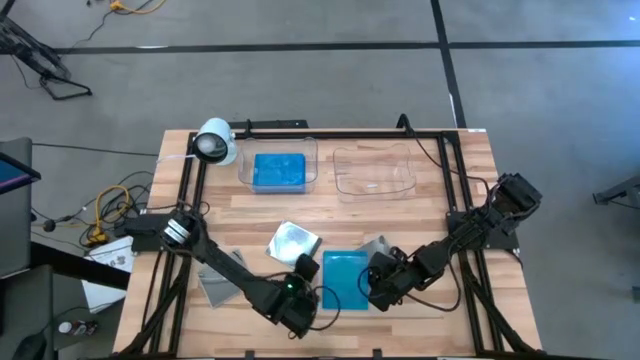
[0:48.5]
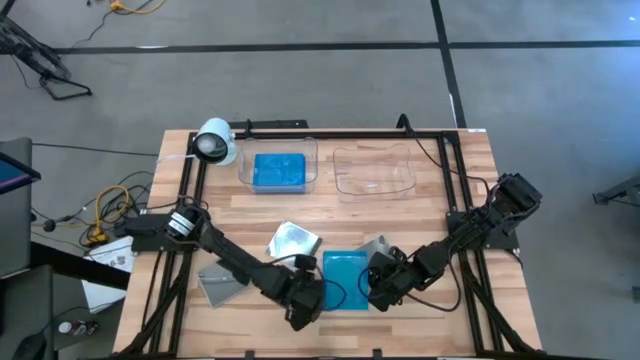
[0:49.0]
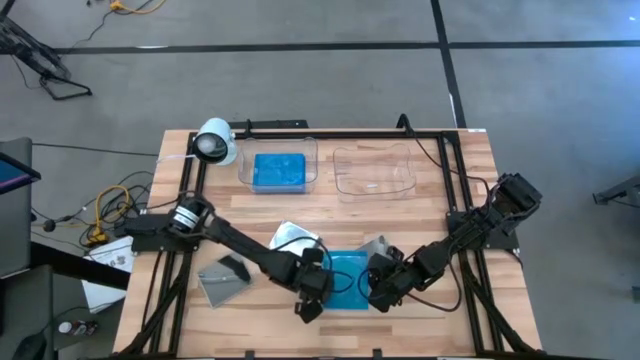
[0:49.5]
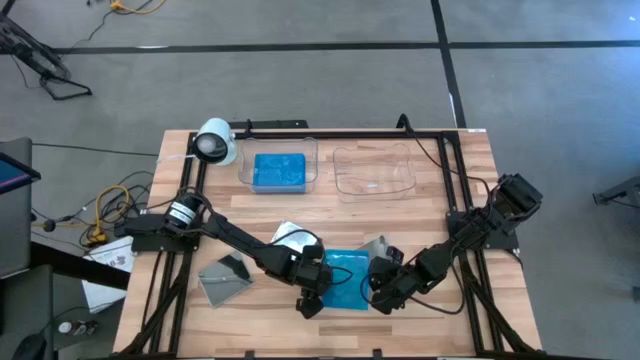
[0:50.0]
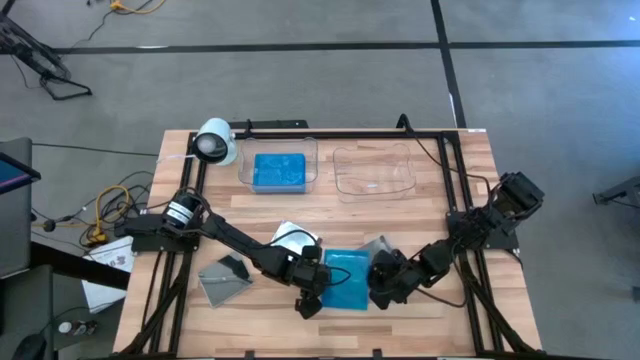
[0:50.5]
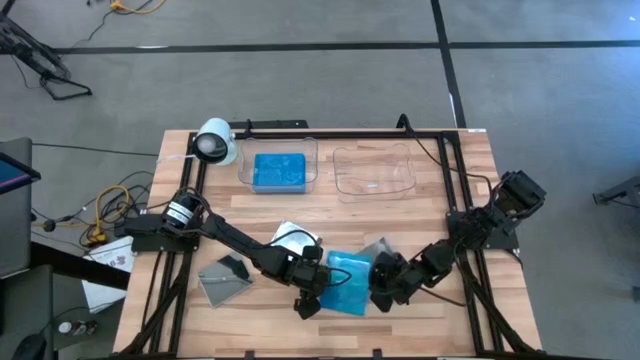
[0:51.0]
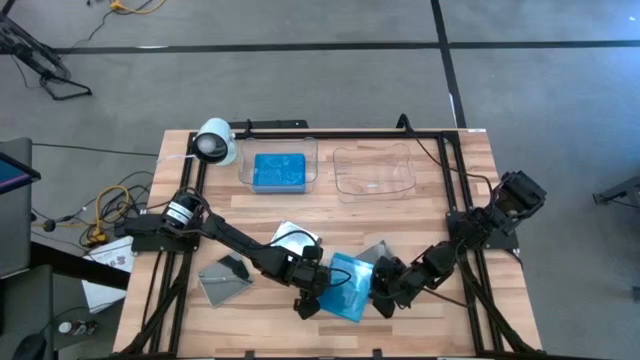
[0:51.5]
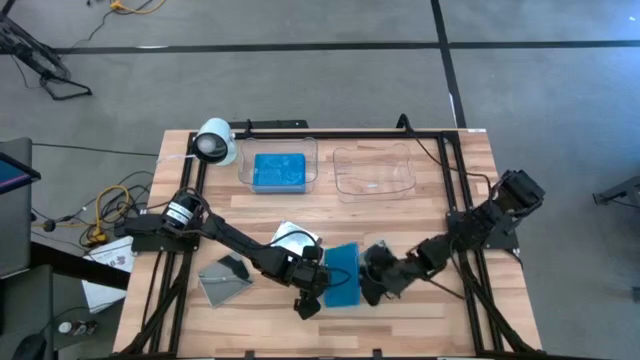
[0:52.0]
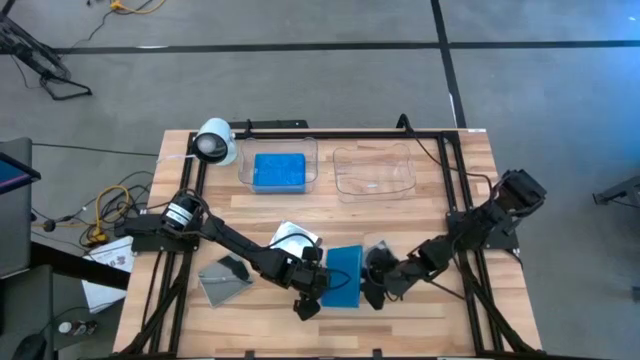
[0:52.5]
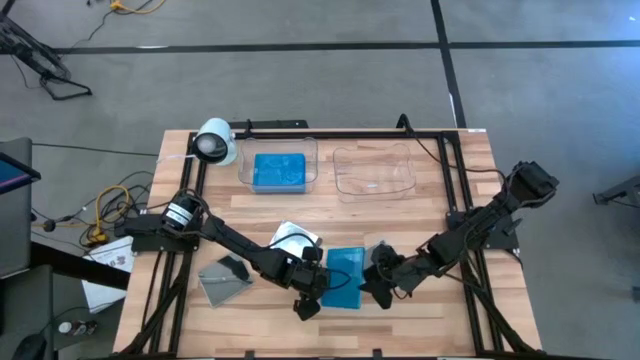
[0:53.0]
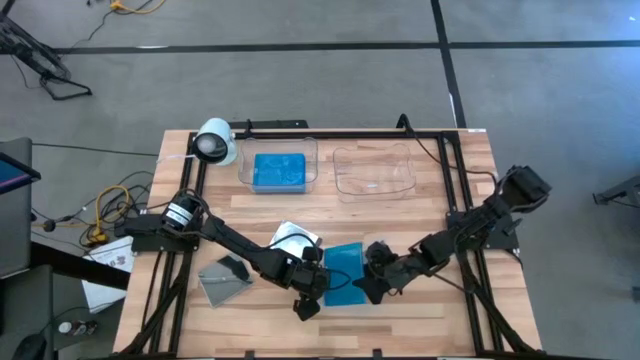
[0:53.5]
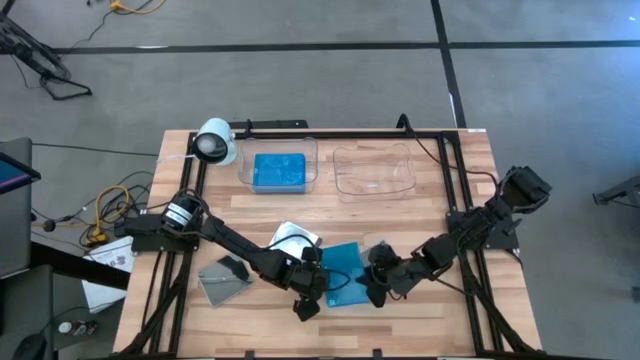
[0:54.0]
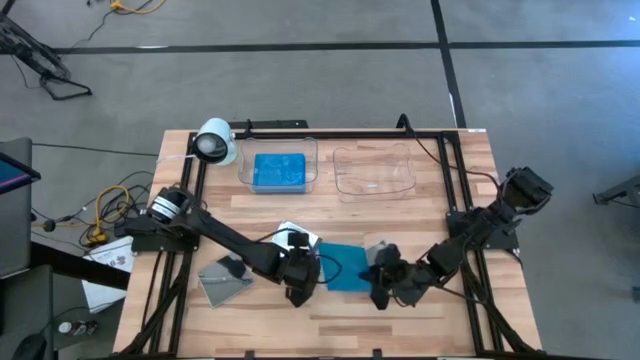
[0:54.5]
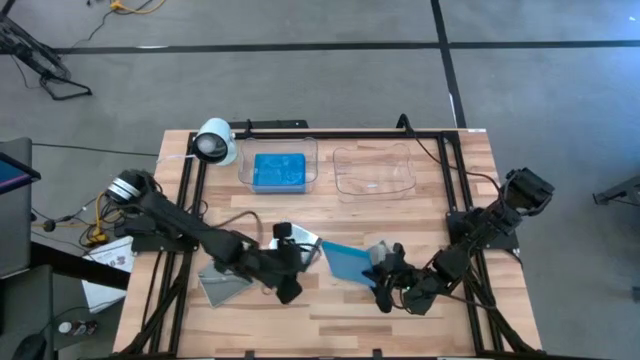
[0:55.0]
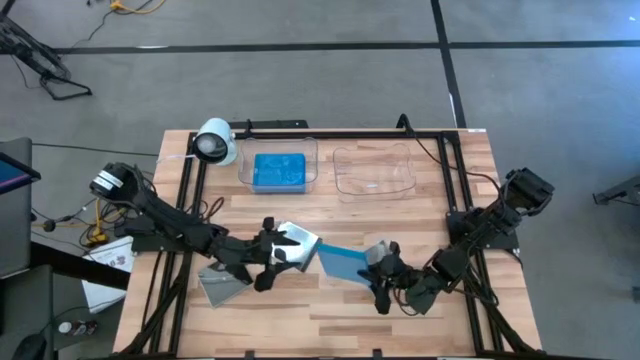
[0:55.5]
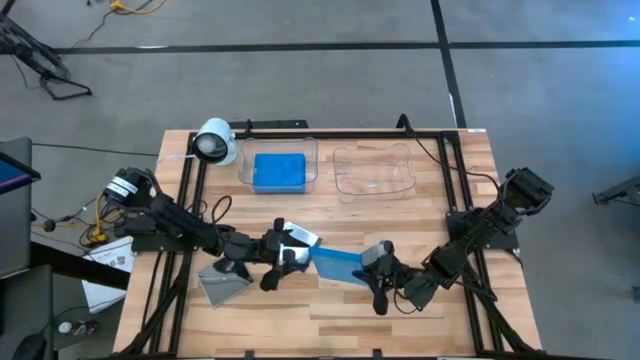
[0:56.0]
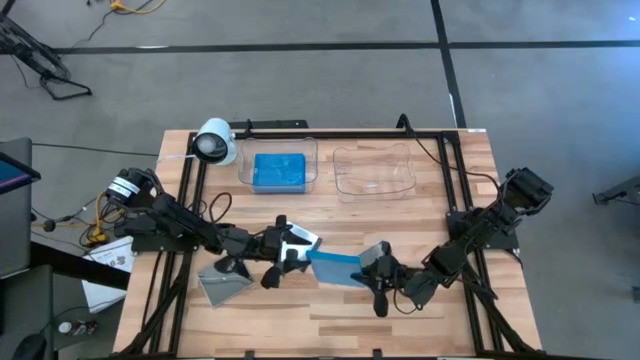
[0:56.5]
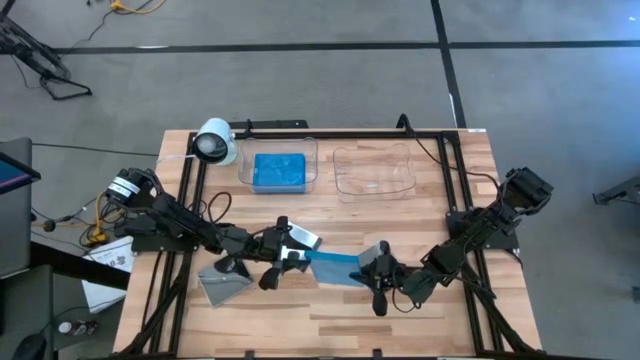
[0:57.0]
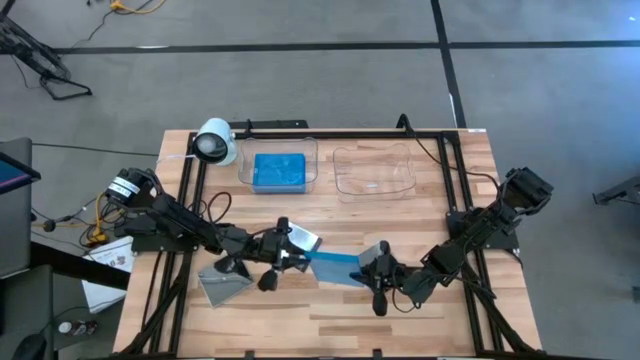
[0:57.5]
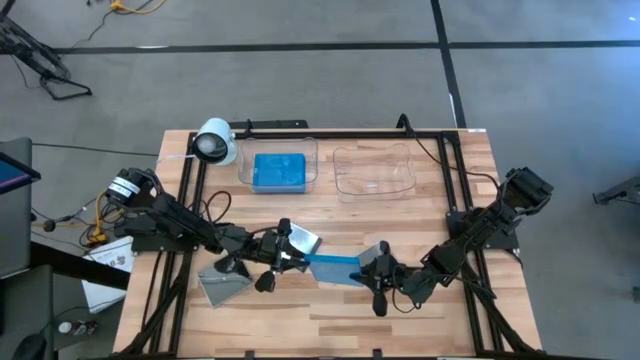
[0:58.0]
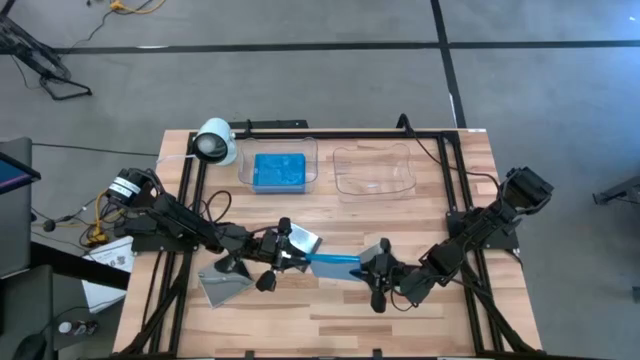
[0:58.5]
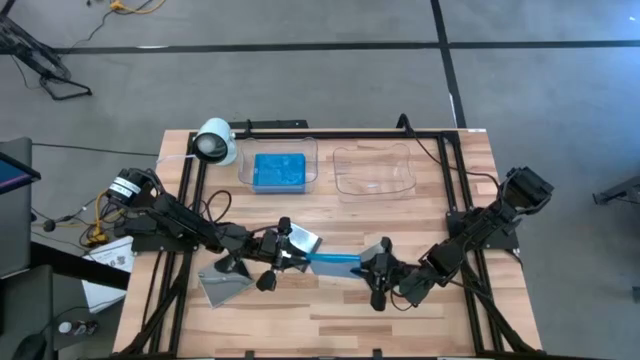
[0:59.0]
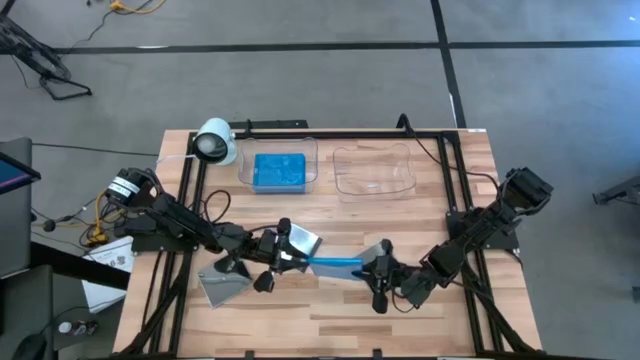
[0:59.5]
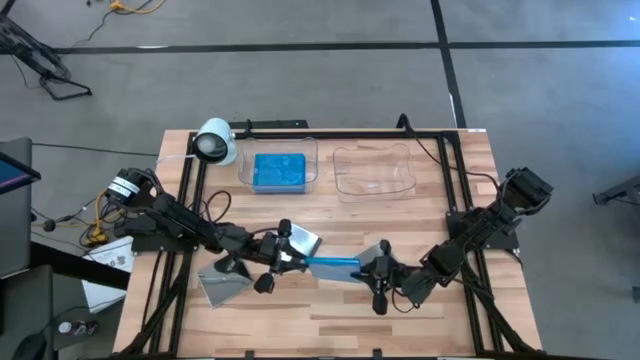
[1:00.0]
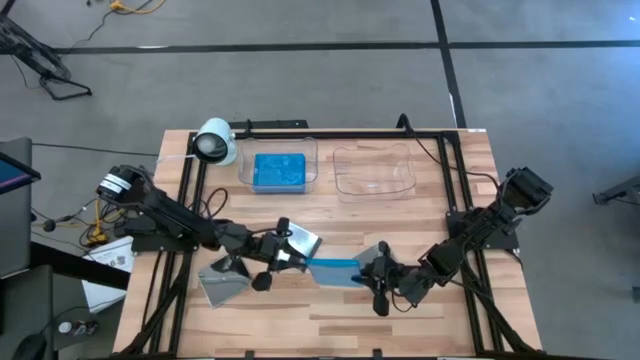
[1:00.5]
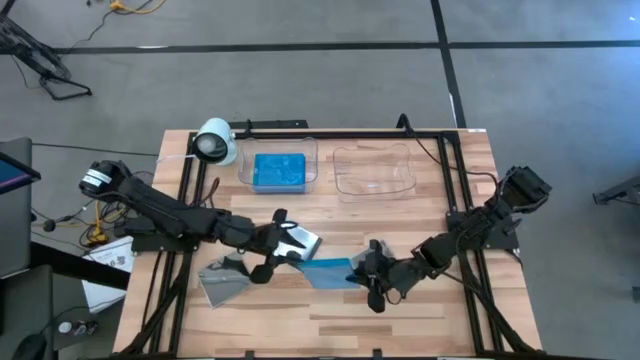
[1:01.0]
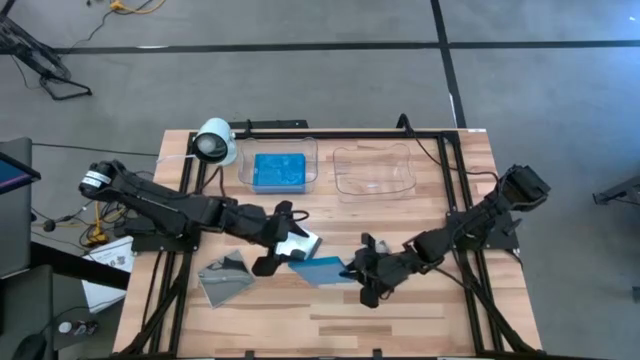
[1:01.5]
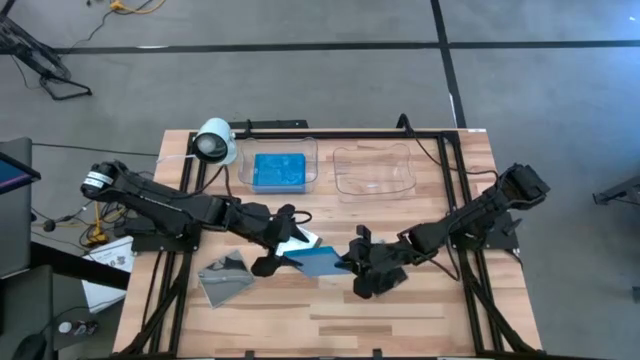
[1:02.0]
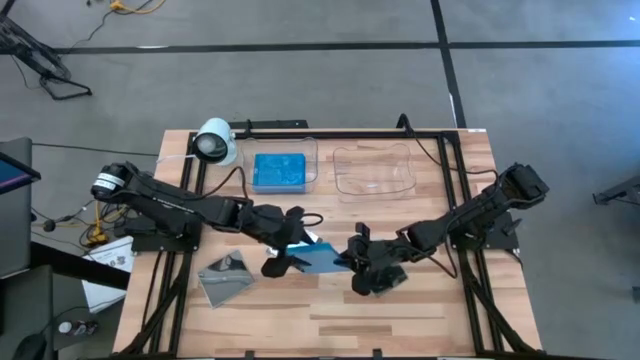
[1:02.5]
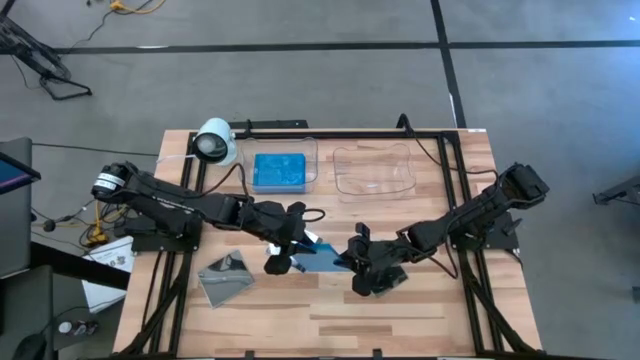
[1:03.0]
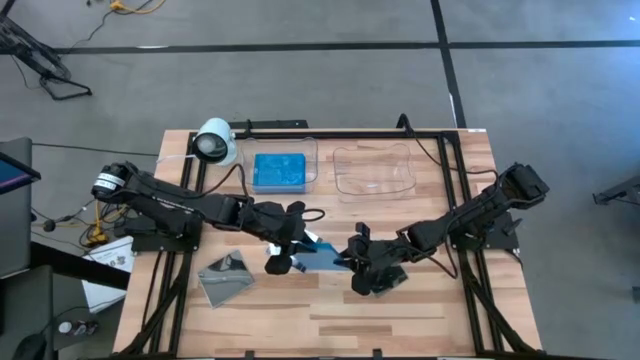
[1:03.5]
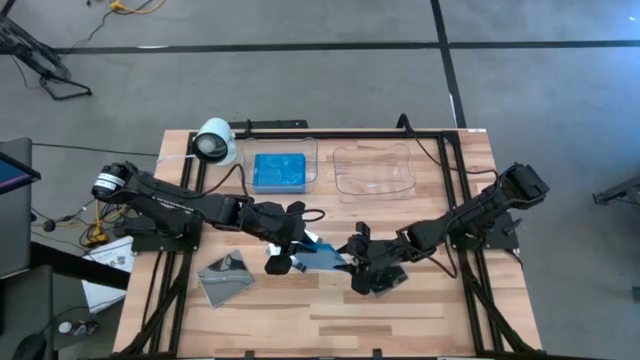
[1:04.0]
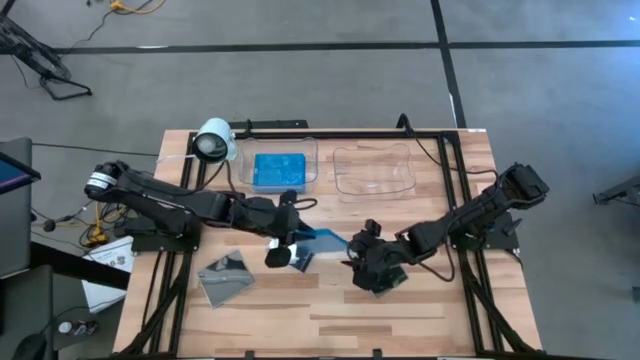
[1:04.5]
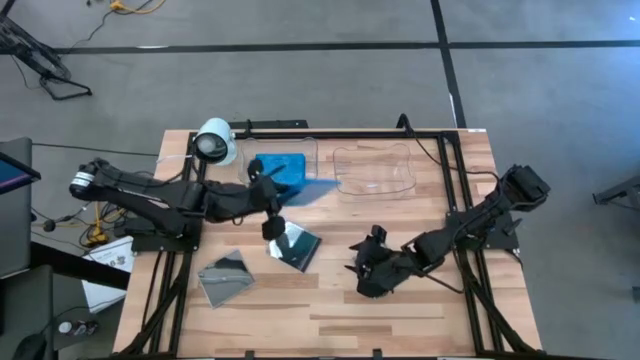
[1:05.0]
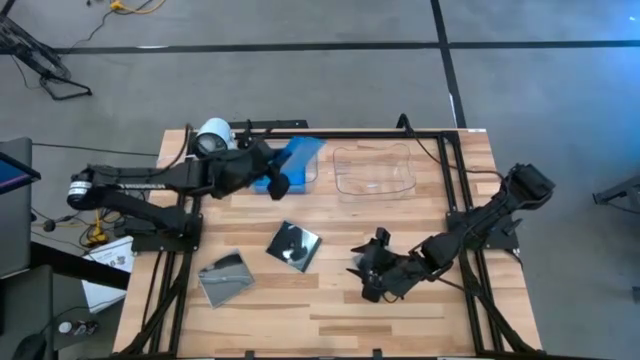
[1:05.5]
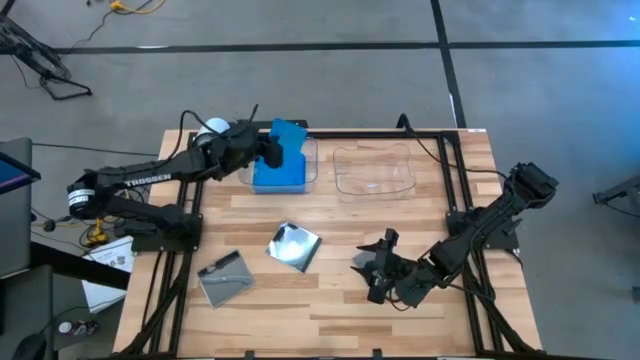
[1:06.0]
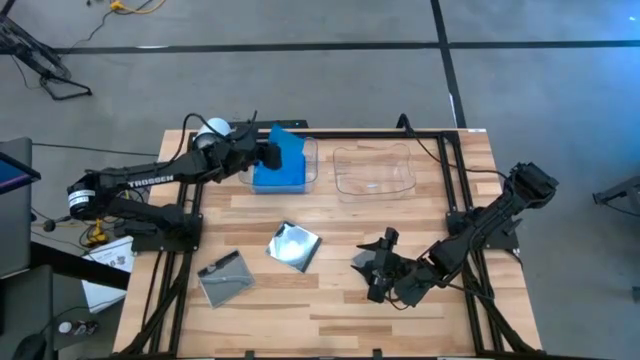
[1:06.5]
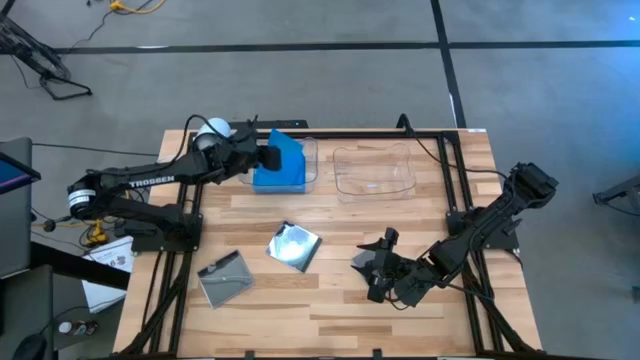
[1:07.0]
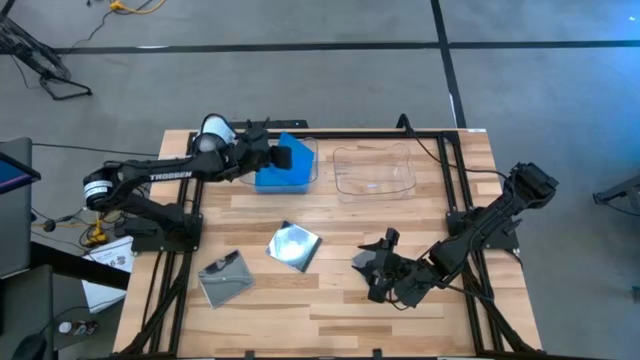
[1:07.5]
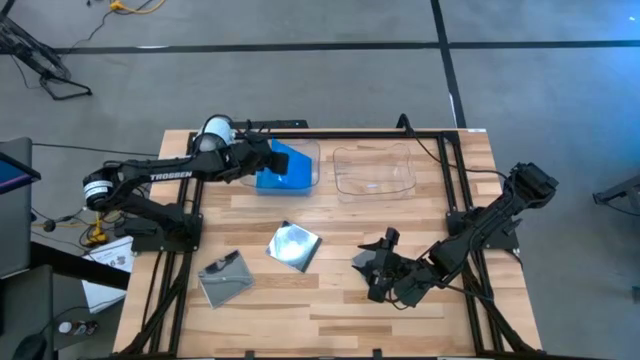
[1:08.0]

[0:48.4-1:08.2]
Task: Pick & place jewel cases by type
Put the blue cd case into the left transparent bin
